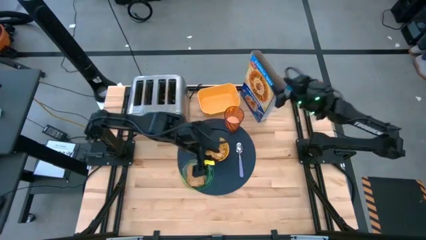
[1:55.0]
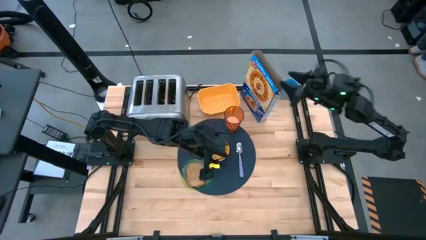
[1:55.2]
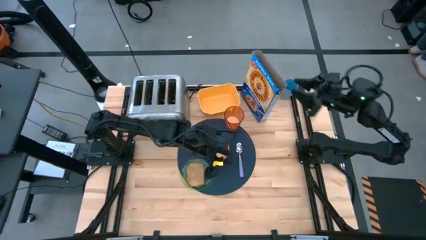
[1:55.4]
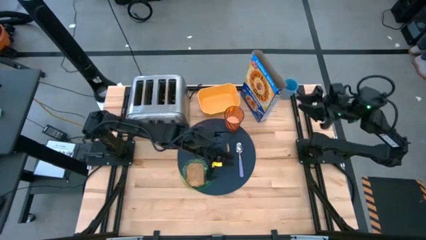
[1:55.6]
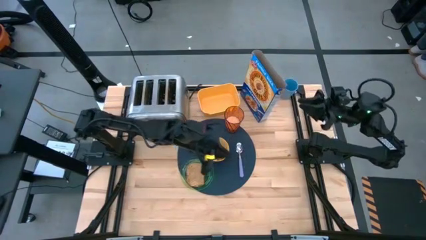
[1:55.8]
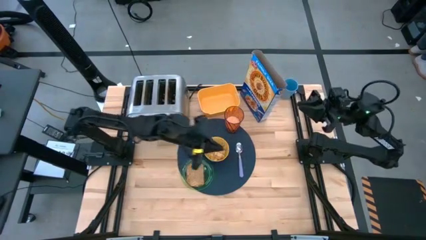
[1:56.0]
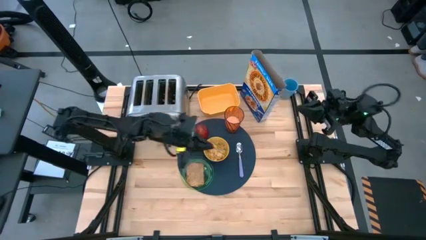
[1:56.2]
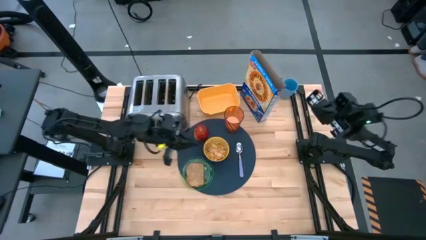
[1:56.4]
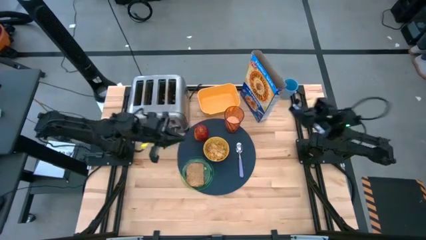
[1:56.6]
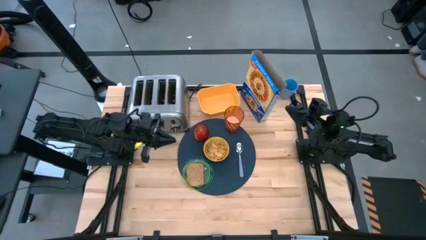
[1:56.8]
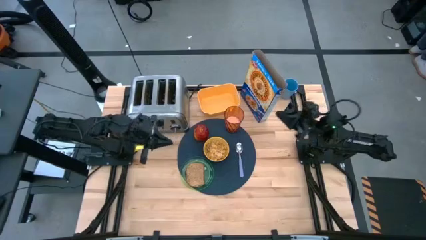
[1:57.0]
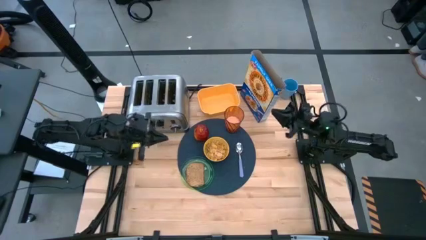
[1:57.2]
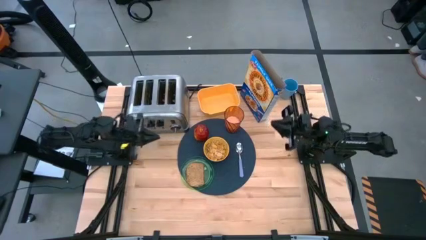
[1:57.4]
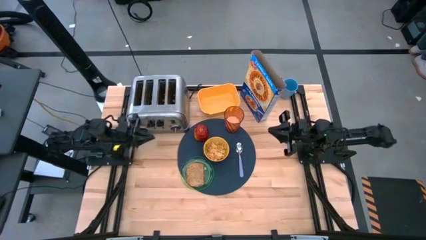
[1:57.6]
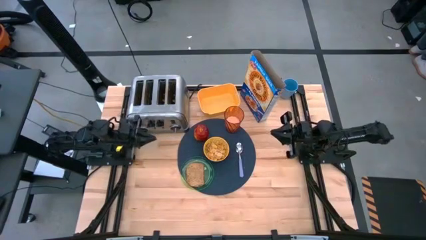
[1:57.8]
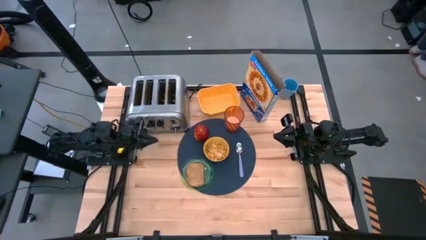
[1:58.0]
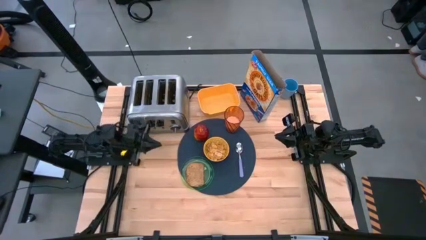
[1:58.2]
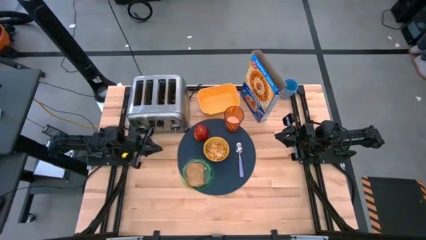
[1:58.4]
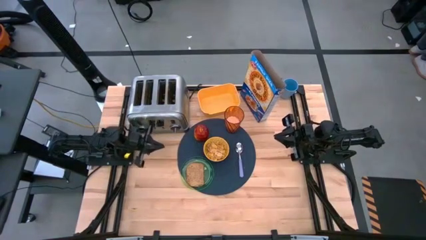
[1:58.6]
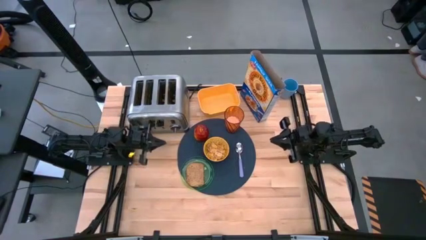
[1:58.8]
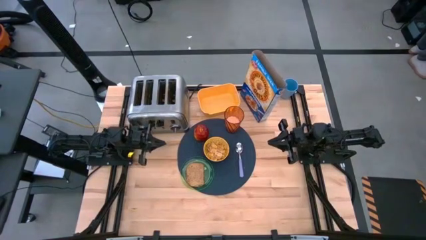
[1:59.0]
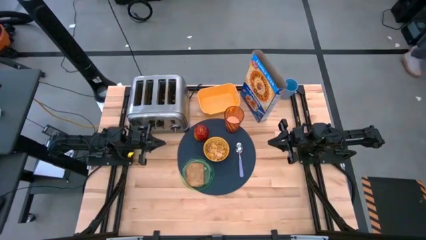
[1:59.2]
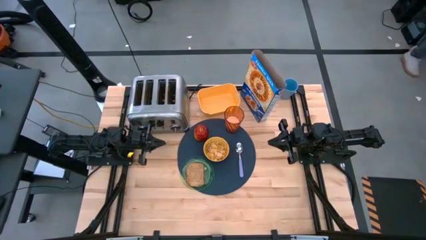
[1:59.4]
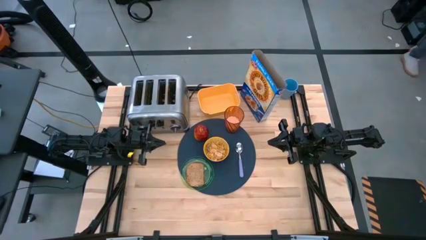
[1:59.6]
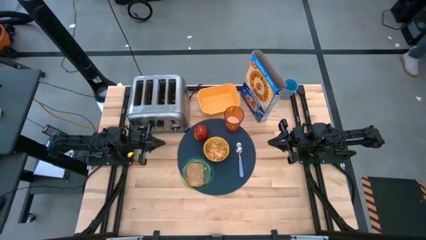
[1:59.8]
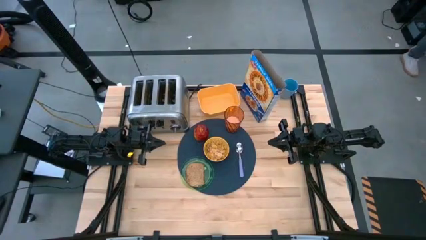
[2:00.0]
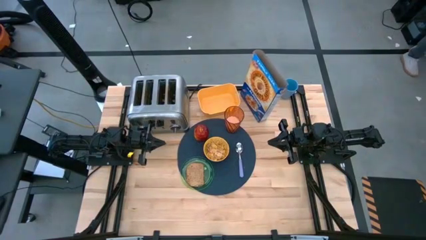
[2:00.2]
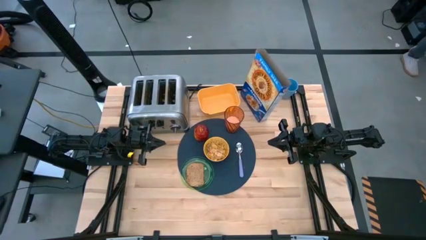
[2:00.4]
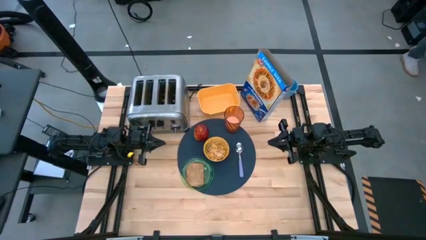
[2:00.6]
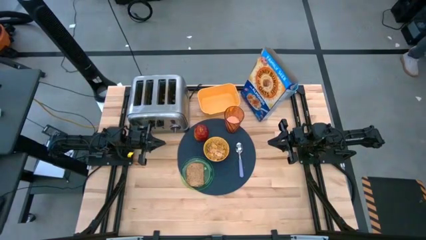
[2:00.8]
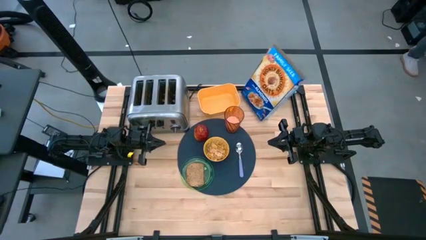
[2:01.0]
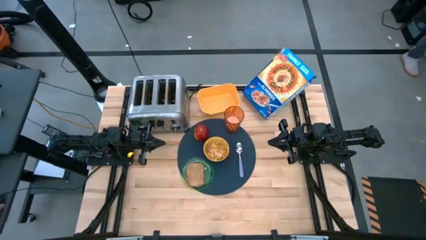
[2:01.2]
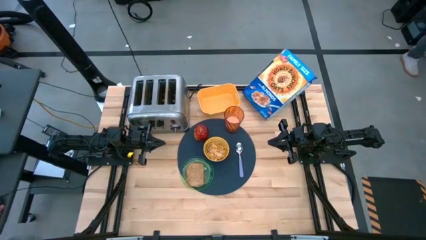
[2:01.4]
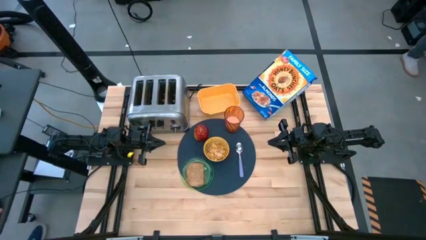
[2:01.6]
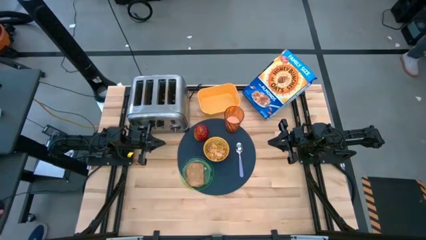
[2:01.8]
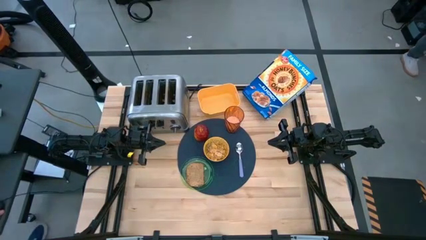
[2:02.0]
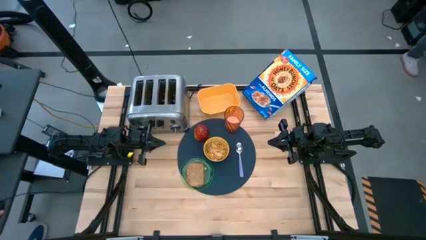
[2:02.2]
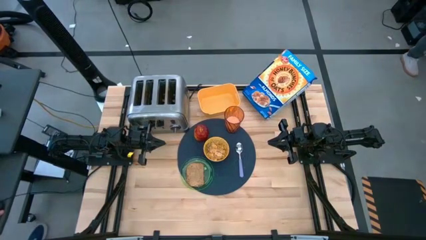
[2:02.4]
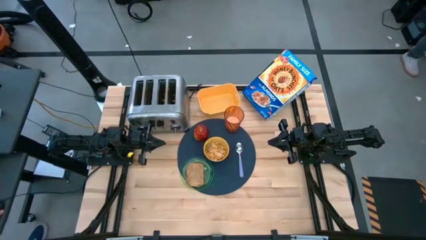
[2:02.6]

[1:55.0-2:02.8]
Task: Arrange a breakfast setting
Return to Home Position

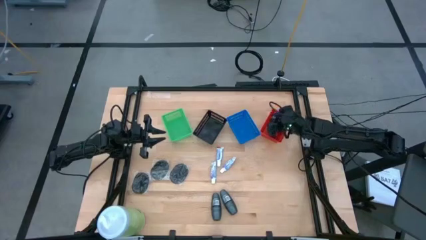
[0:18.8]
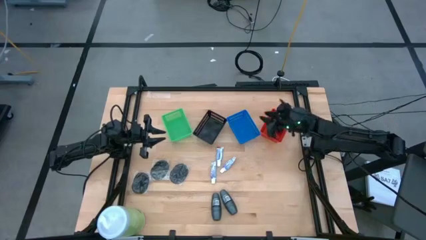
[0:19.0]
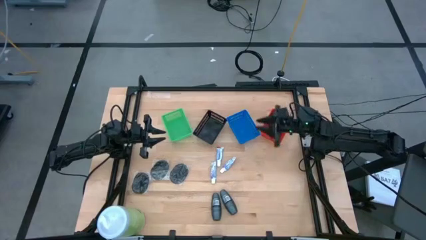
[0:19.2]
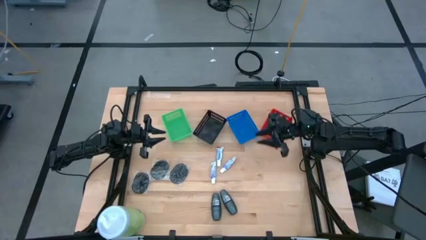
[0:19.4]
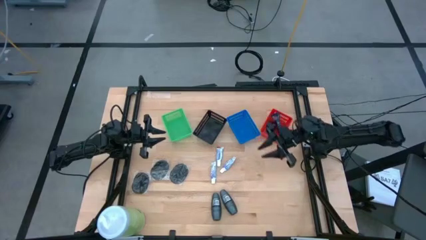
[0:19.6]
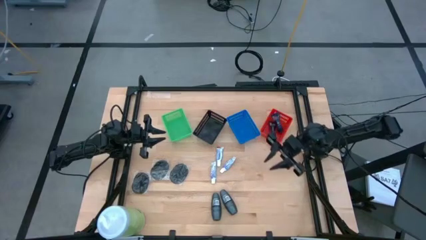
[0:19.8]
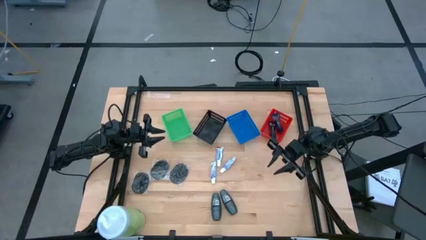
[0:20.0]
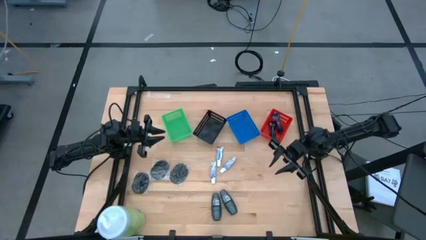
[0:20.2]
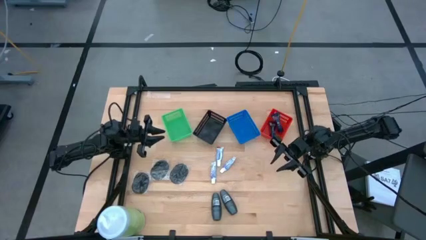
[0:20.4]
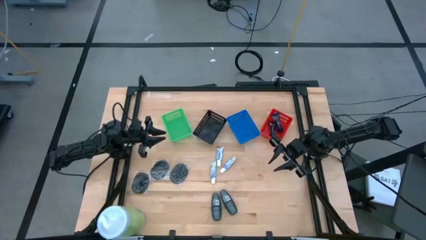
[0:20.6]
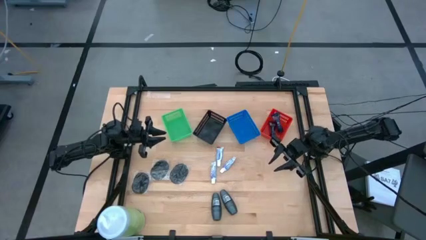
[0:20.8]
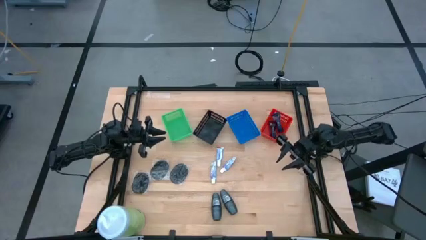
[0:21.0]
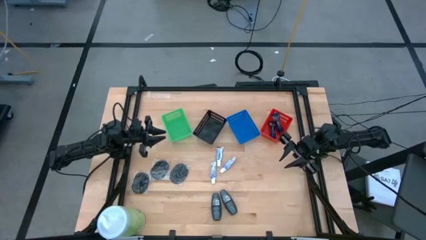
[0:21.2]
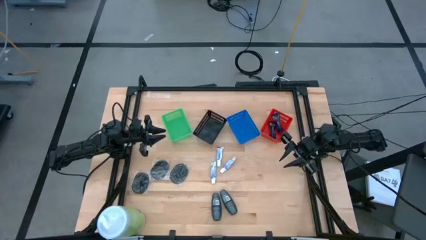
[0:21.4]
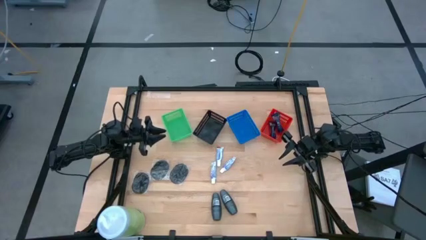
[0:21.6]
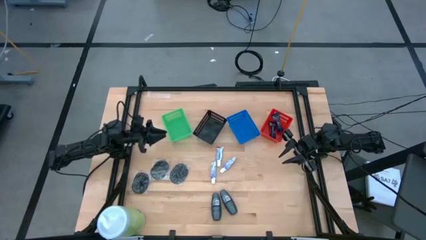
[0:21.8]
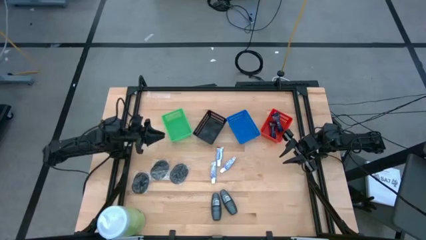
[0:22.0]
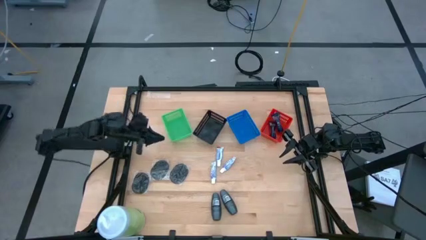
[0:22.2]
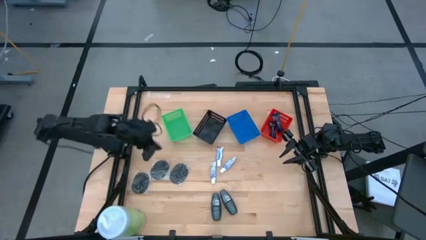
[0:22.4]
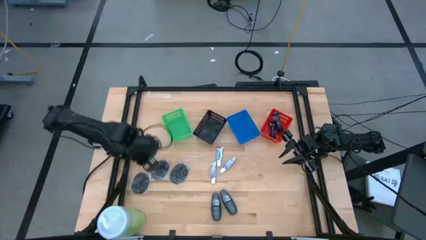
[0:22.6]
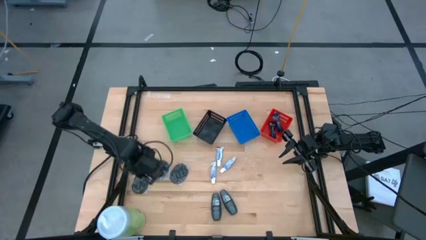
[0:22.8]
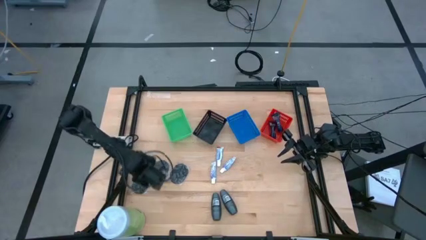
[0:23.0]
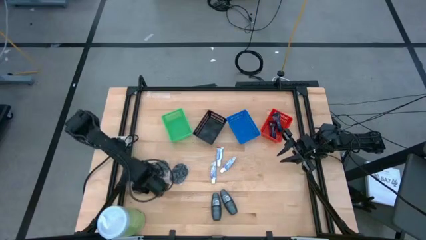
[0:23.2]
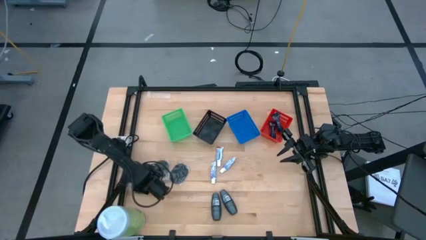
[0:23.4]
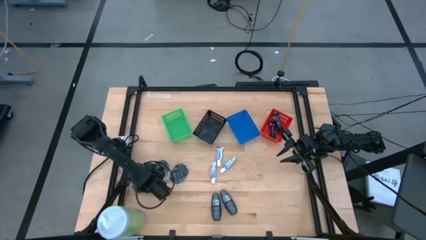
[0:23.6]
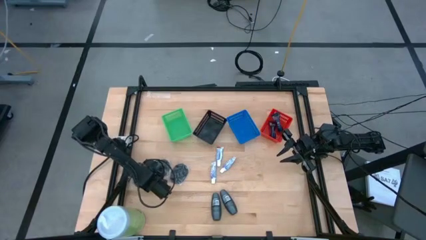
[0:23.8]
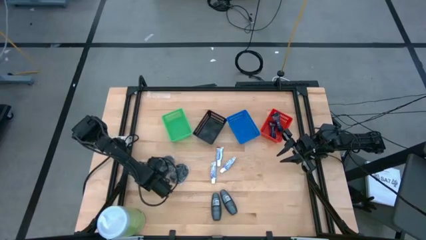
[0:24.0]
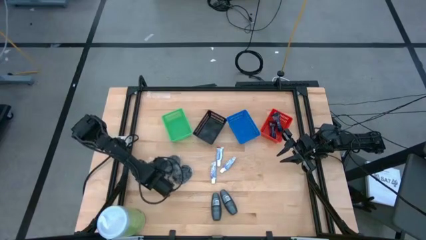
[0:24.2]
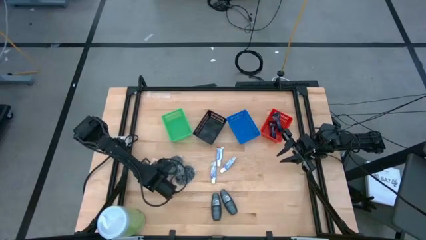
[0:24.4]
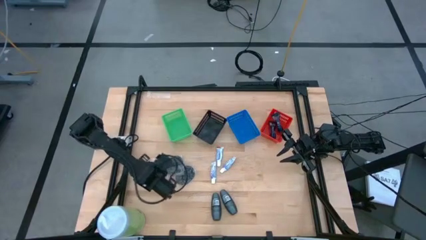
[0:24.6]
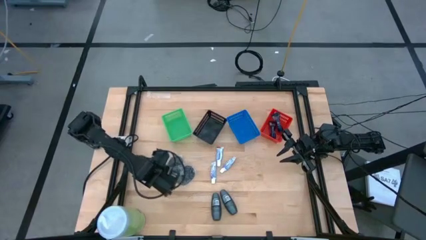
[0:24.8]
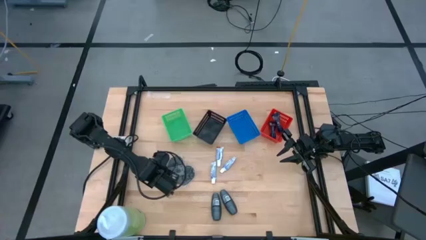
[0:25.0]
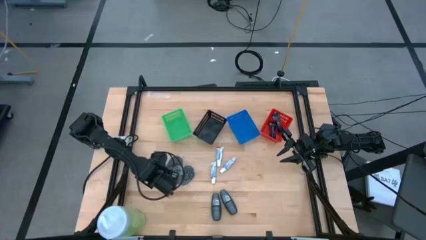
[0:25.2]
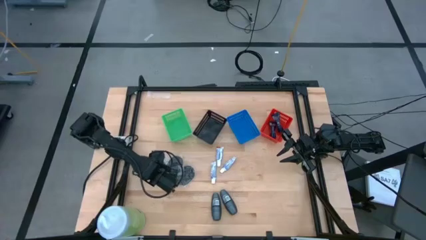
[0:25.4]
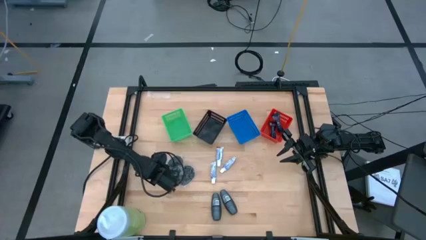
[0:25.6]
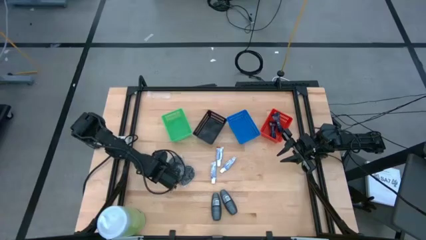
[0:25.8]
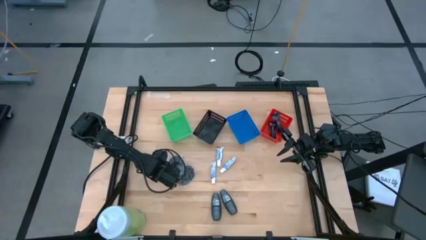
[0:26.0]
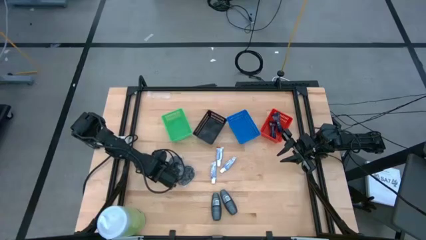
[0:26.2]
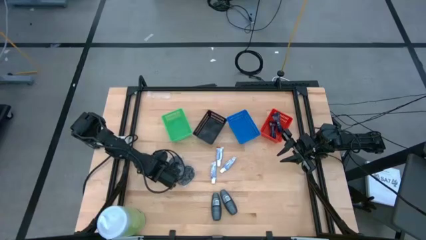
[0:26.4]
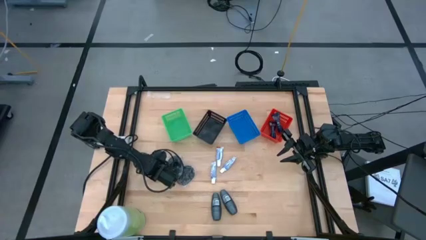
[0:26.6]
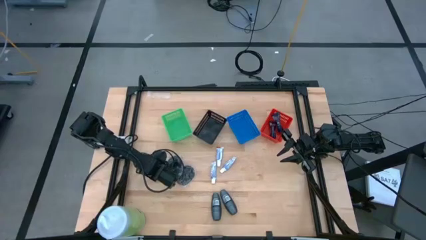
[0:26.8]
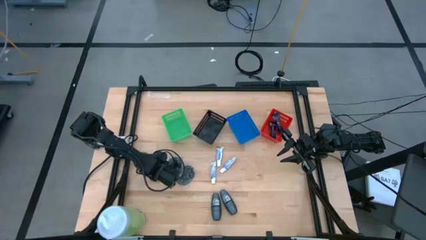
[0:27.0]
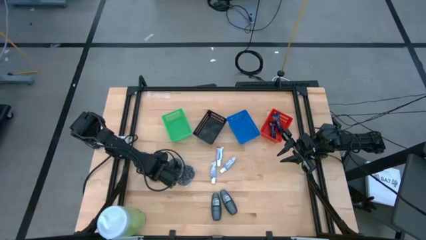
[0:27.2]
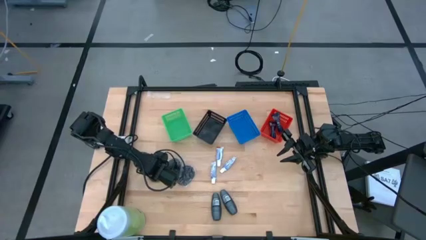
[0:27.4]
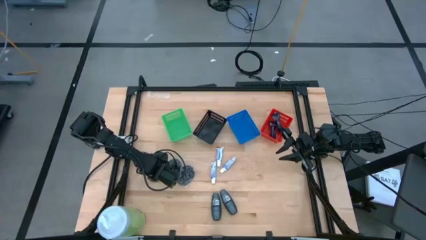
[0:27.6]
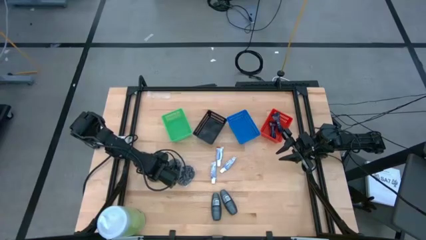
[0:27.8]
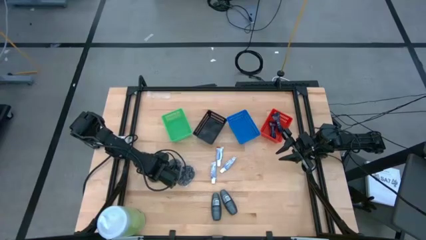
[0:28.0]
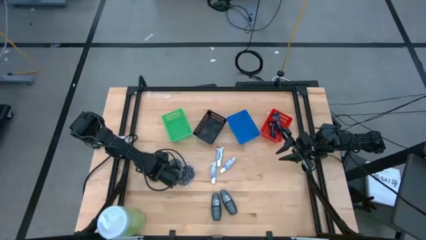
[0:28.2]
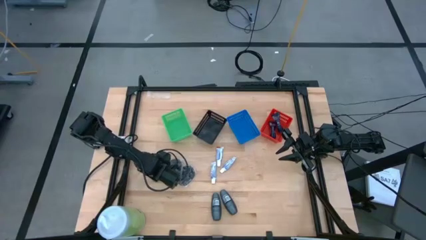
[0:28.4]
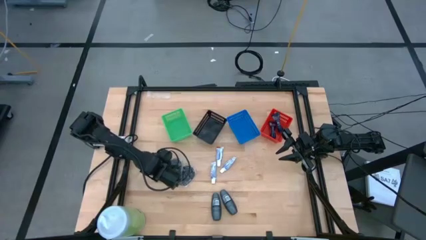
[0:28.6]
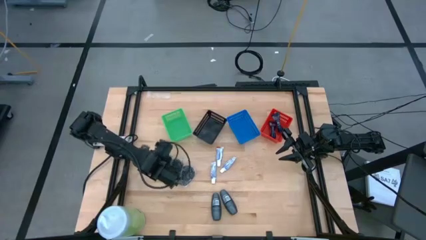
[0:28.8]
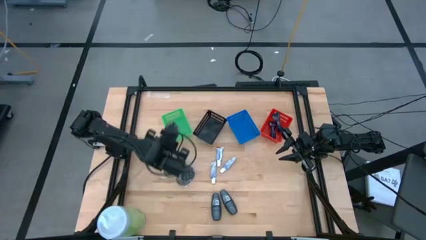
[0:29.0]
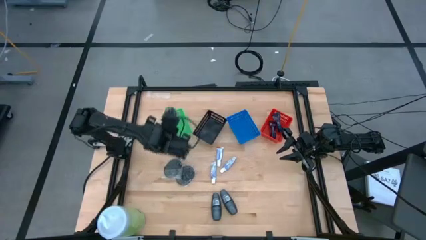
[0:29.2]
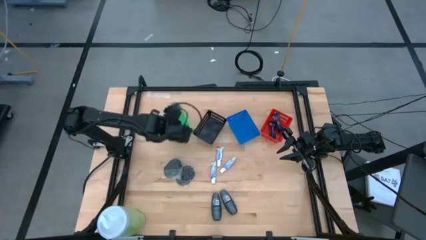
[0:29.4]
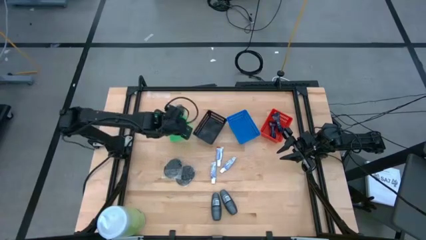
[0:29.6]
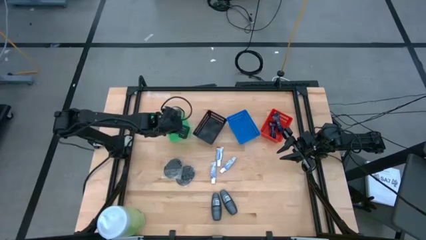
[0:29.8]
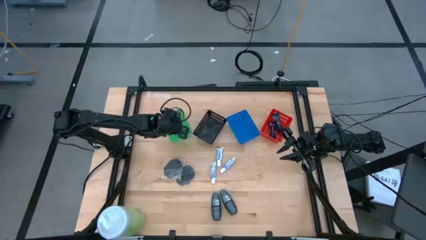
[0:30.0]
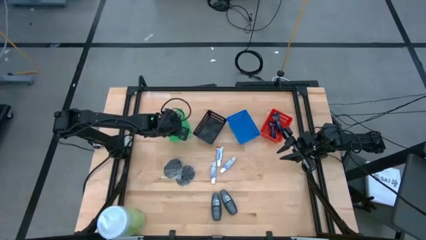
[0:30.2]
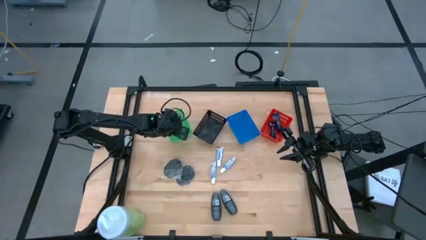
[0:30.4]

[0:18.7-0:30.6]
Task: Pick & Place Travel size toiletries
Put the bottom black hairbrush into the green bin
